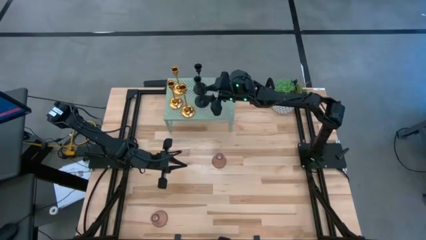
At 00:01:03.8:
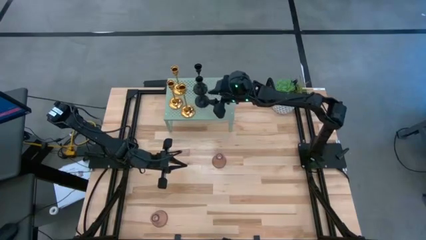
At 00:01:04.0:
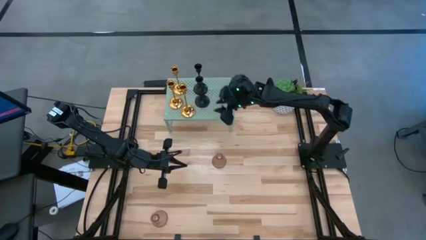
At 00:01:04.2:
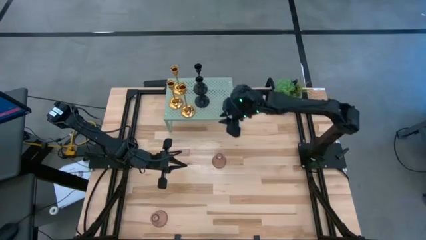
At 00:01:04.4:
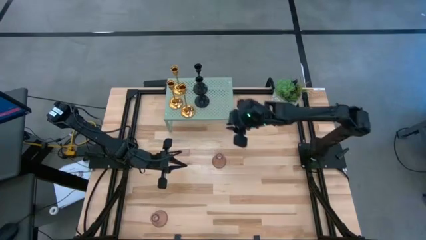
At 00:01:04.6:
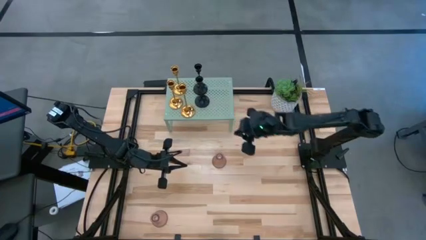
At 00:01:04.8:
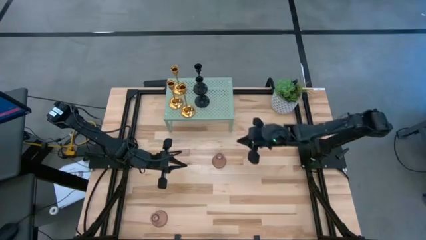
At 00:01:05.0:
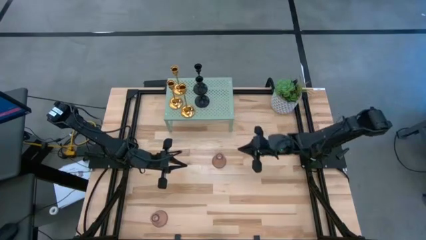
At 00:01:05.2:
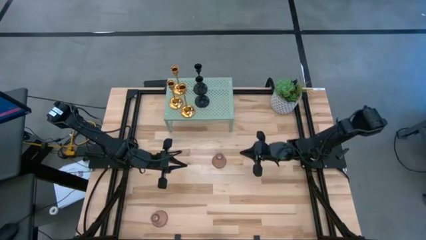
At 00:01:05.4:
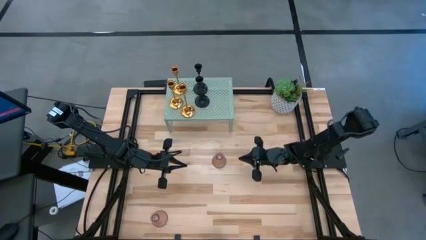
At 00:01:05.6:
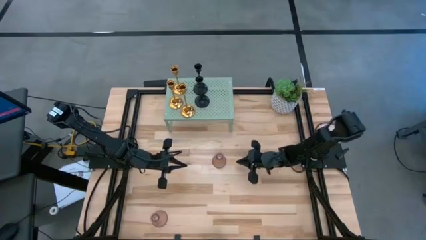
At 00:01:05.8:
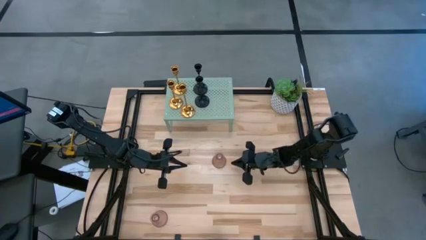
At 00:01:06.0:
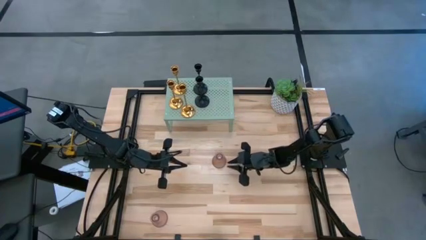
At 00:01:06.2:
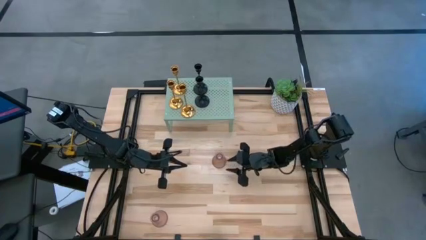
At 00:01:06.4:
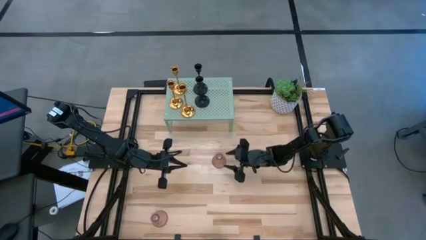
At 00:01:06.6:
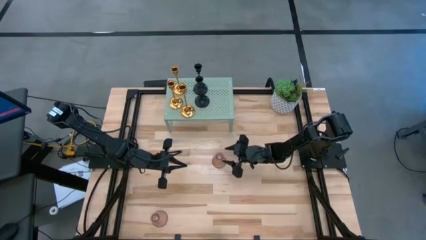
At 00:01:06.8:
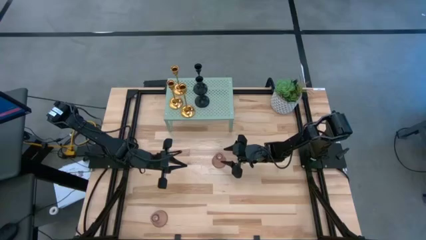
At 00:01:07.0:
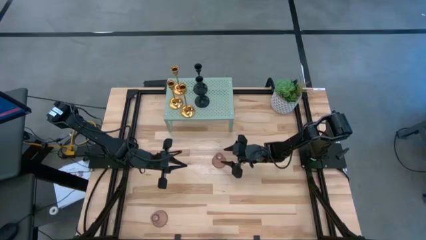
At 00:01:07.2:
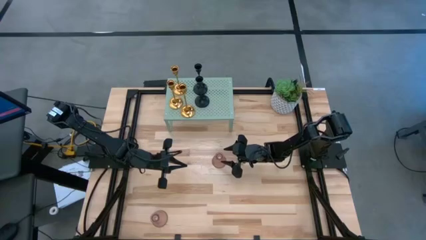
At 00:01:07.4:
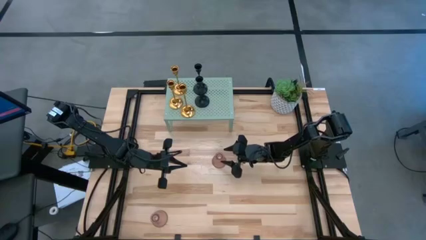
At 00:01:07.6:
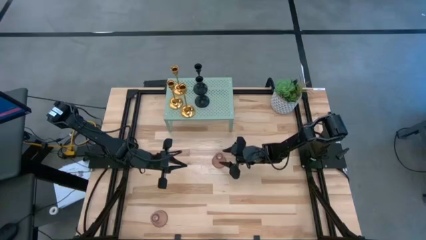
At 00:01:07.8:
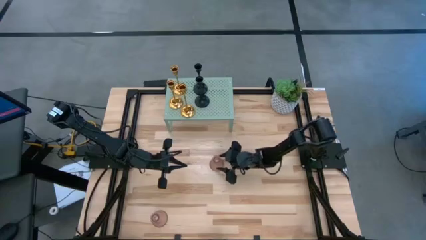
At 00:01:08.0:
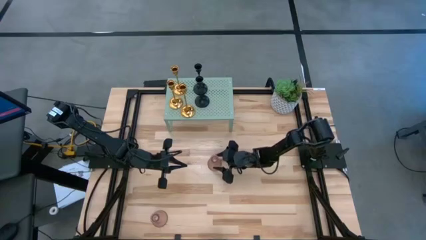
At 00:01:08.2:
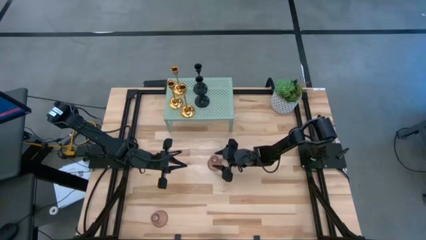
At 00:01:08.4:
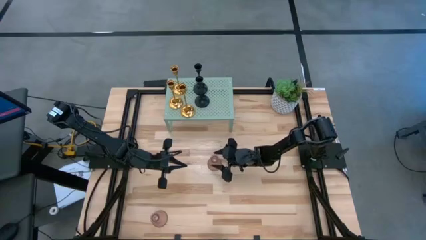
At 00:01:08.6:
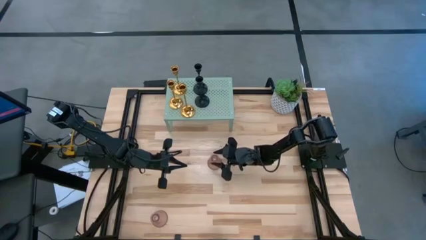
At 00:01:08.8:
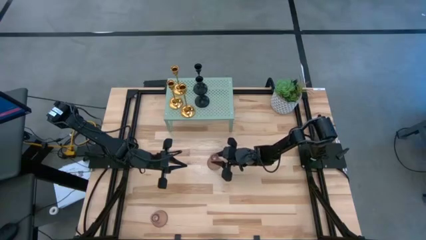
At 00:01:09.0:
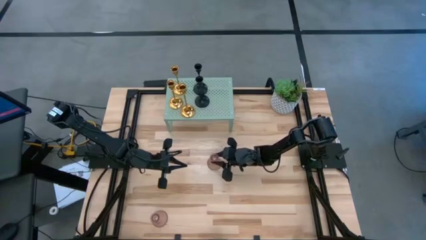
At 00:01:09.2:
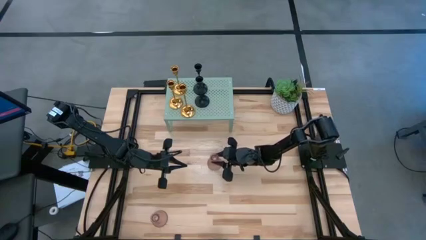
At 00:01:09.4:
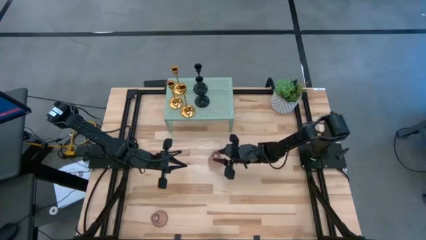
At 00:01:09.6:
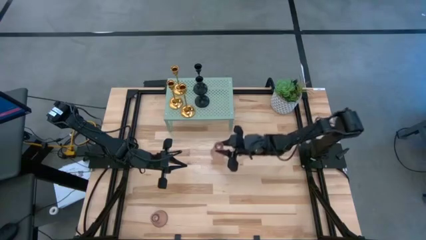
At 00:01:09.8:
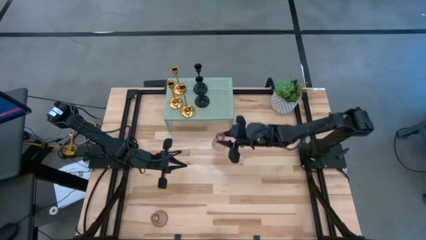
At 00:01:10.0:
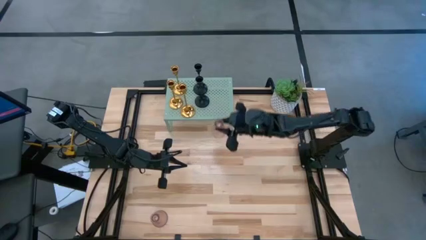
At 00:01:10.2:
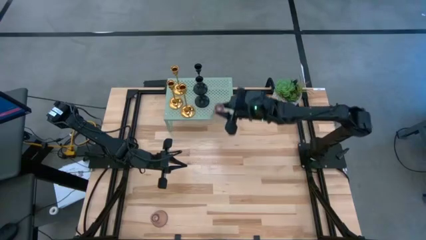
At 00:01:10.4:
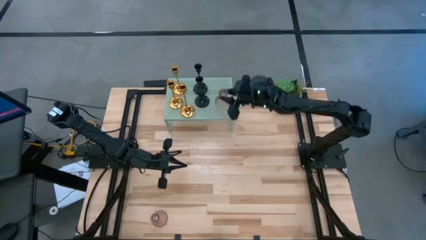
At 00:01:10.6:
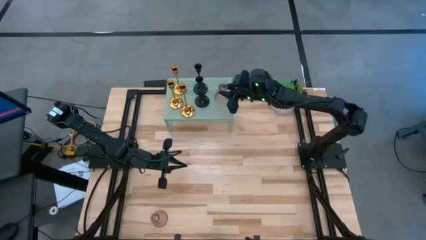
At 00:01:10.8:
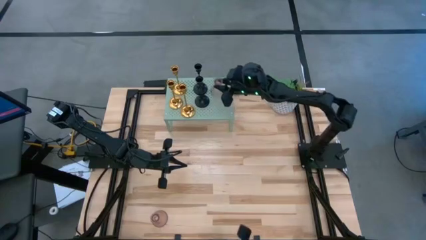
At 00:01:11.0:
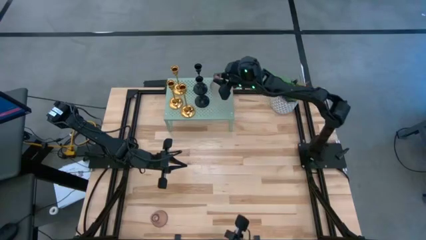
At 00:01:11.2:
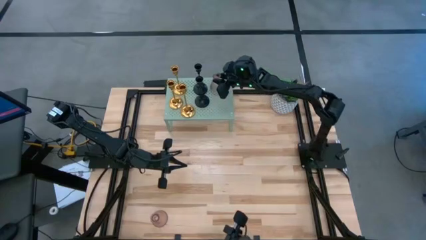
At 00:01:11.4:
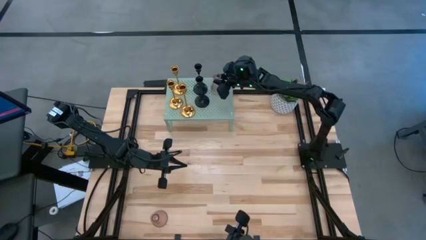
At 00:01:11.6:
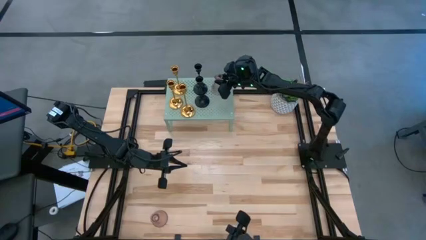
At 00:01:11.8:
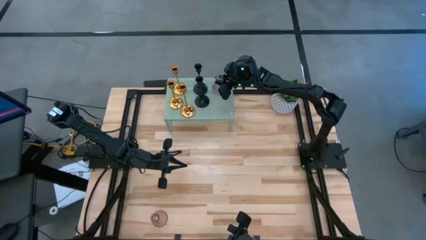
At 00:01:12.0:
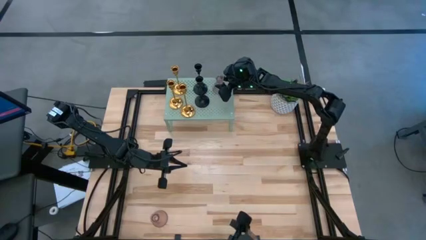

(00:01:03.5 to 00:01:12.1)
Task: Pick & Place candle stick holders
Put the top purple glass candle holder on the shelf

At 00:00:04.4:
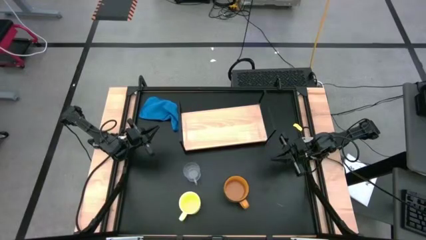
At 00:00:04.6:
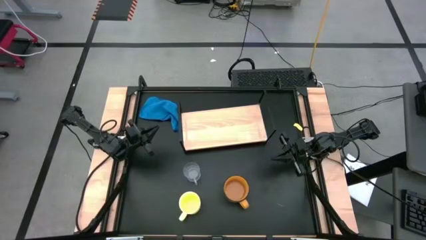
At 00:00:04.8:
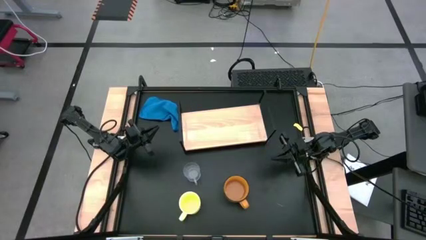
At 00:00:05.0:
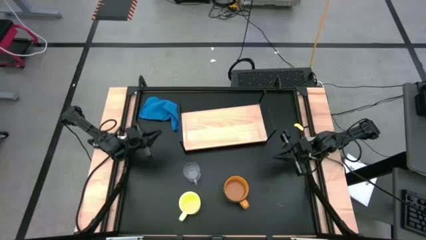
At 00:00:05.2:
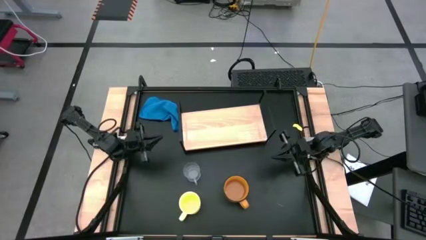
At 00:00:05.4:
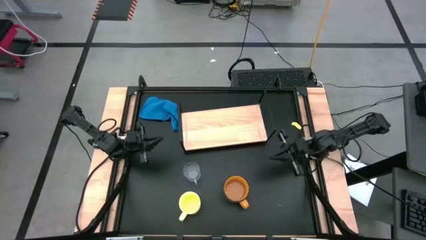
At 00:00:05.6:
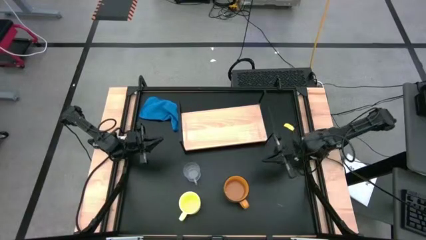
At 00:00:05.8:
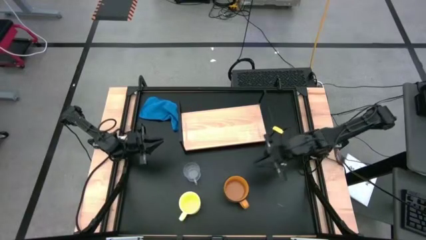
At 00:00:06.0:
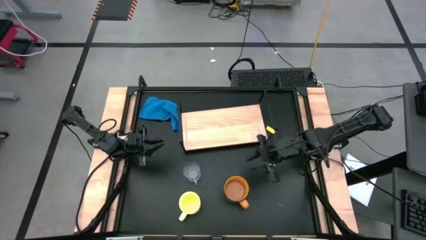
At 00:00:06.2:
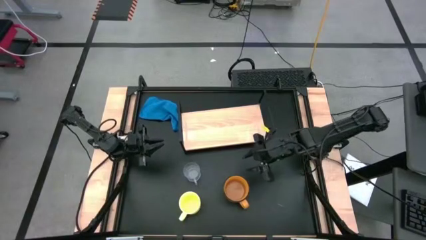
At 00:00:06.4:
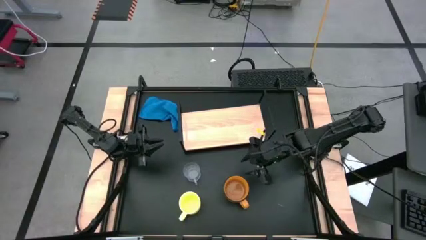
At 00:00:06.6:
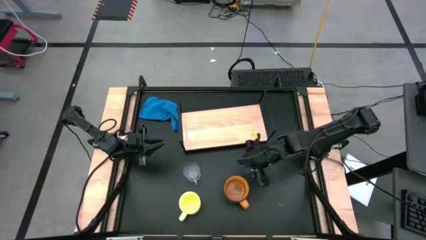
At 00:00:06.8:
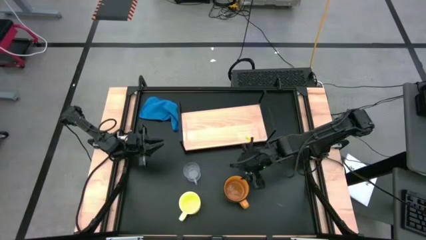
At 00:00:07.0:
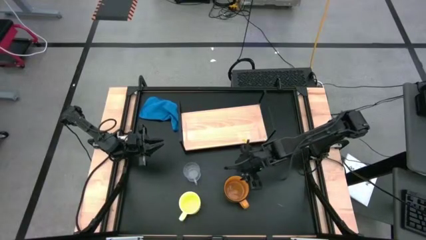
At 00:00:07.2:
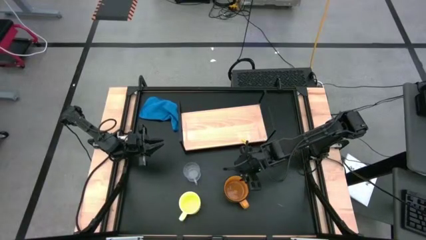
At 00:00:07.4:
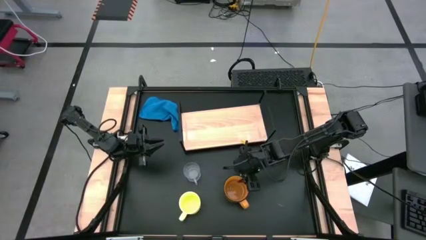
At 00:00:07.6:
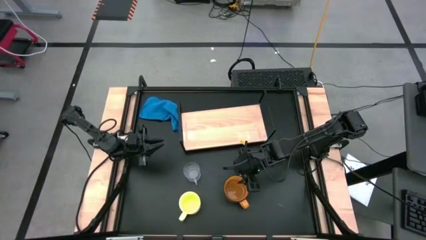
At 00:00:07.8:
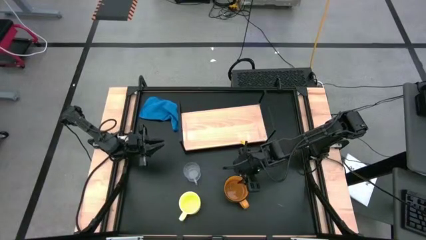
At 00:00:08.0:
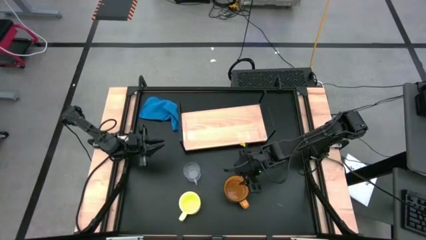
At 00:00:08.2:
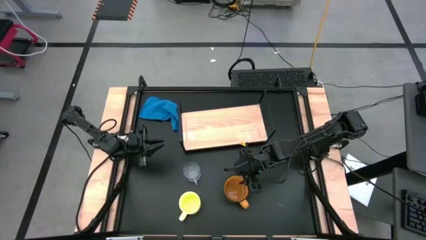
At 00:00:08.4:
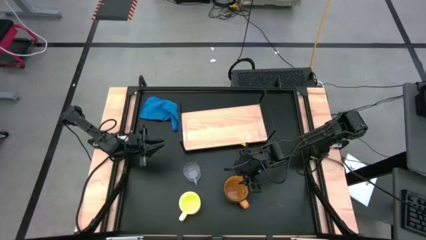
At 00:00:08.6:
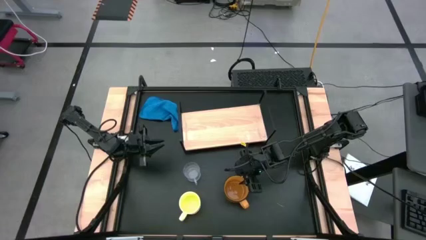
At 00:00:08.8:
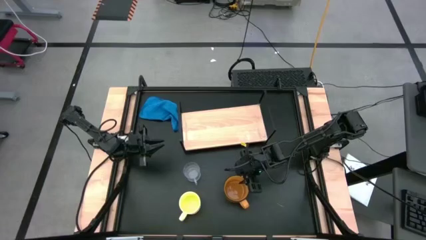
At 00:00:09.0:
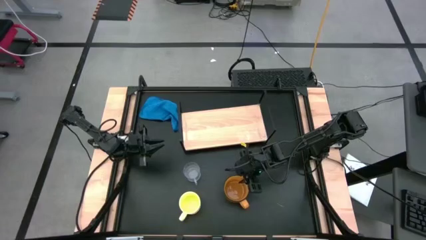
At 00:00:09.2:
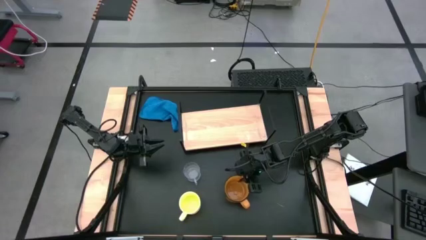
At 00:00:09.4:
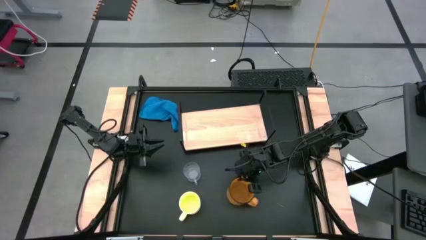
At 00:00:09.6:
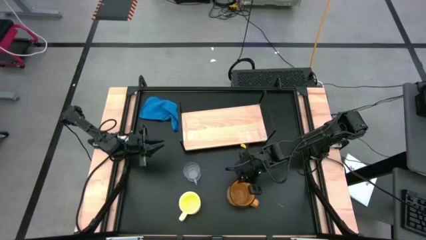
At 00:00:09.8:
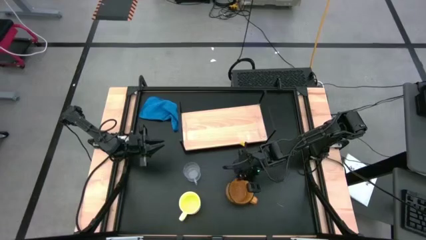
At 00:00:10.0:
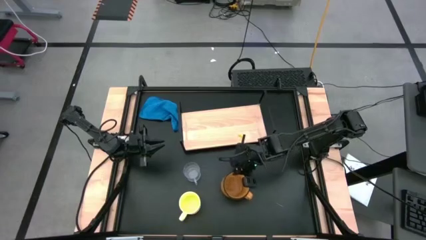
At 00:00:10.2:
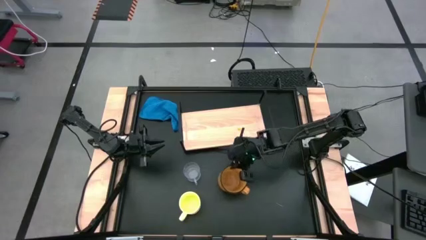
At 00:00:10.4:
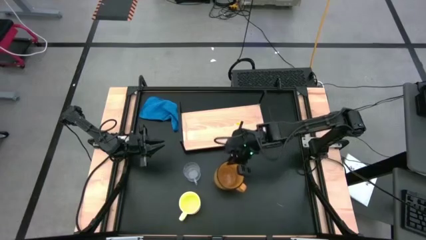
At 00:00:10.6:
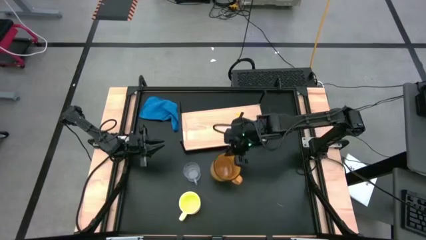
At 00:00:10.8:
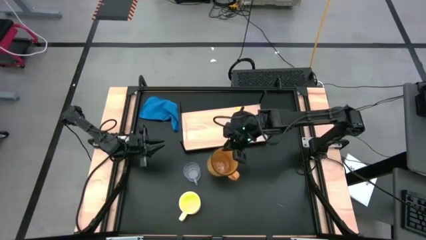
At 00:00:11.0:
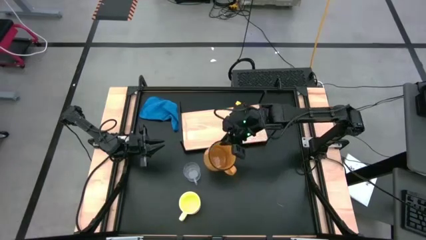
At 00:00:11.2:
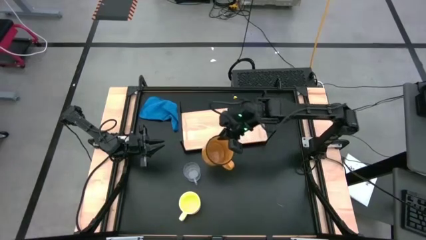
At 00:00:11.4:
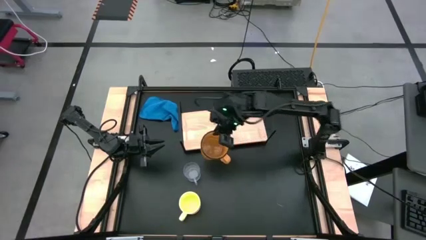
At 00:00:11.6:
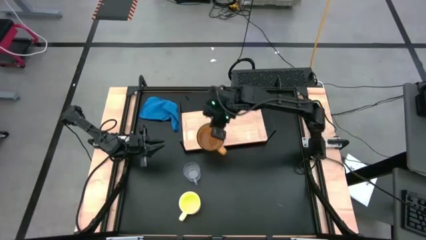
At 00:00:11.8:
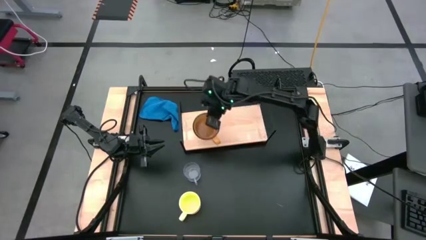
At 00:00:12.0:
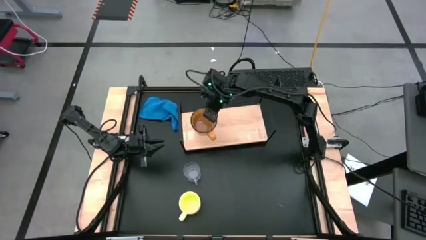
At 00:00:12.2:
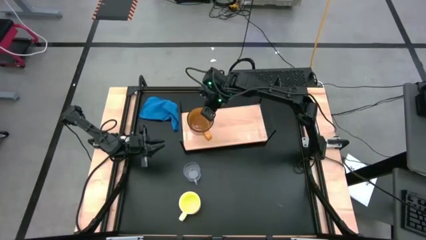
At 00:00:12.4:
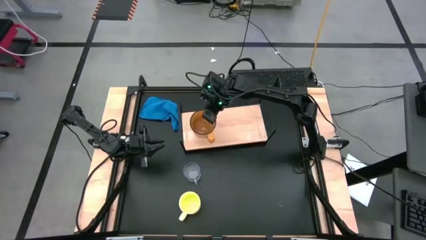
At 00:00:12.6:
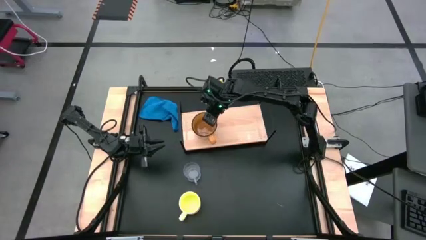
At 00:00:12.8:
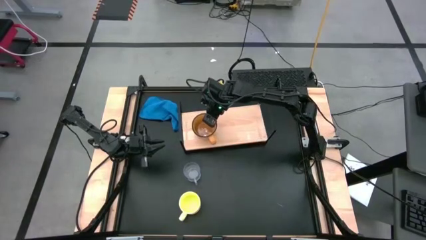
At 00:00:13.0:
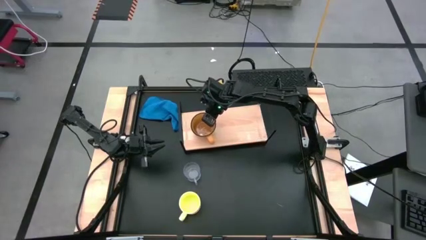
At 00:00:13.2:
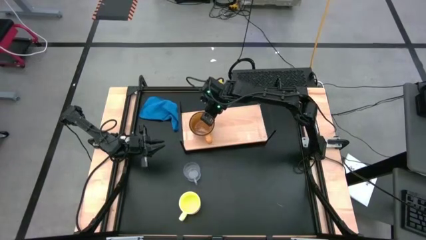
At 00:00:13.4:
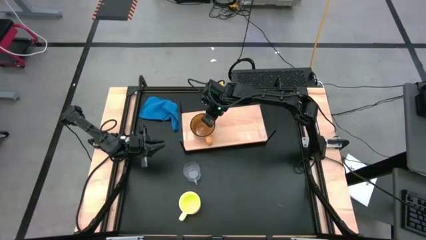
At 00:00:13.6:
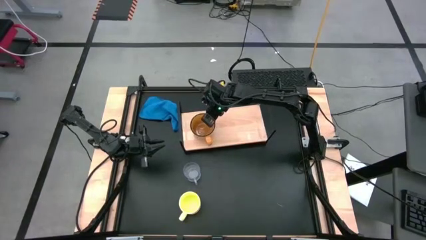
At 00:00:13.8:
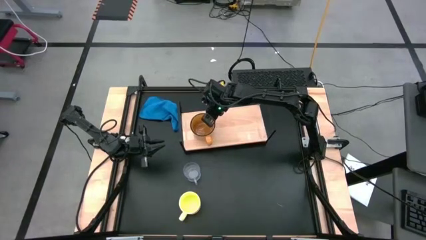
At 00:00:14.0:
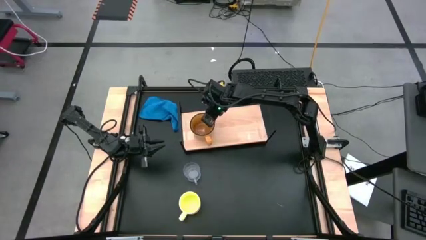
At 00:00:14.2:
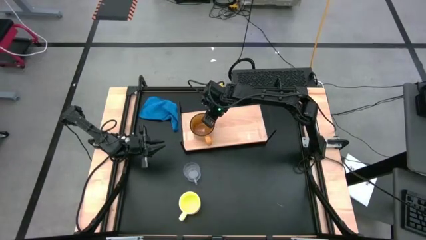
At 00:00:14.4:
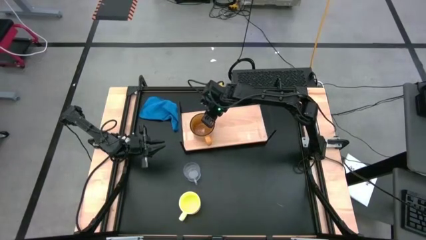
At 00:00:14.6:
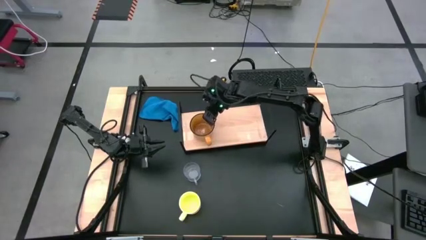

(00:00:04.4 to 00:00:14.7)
Task: Stack small to large cups/mugs on shelf
Put the orange mug on the shelf
